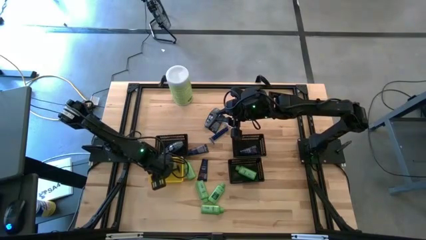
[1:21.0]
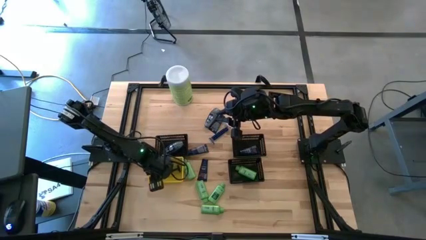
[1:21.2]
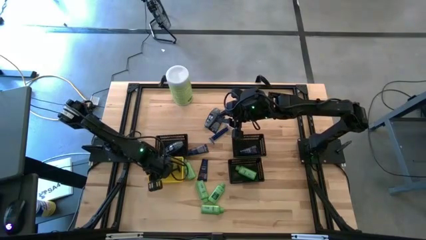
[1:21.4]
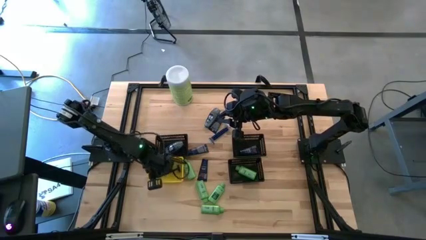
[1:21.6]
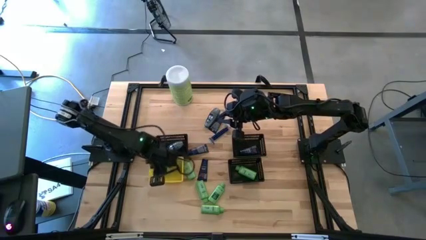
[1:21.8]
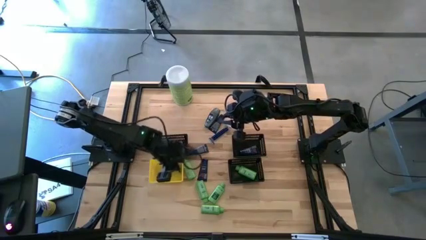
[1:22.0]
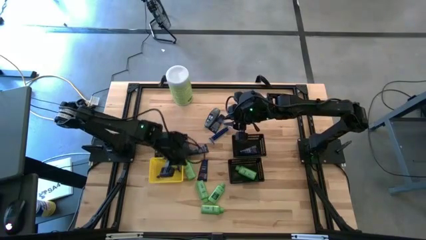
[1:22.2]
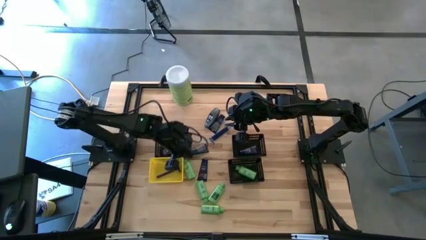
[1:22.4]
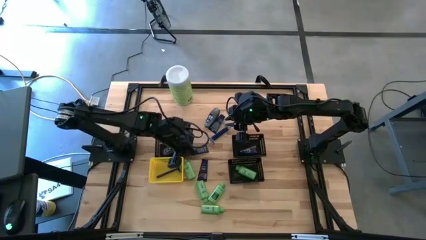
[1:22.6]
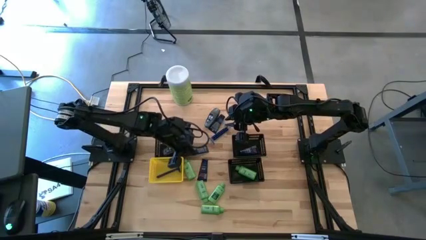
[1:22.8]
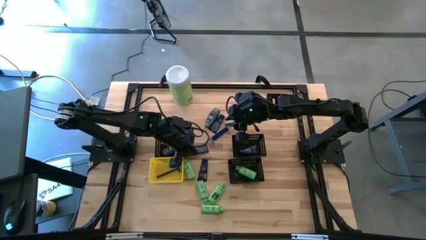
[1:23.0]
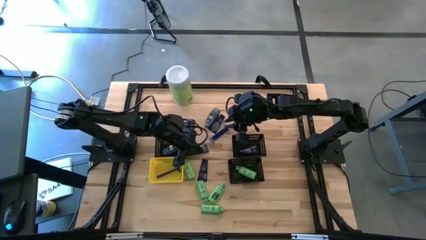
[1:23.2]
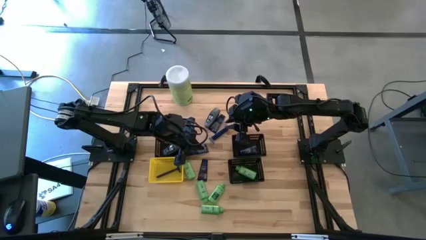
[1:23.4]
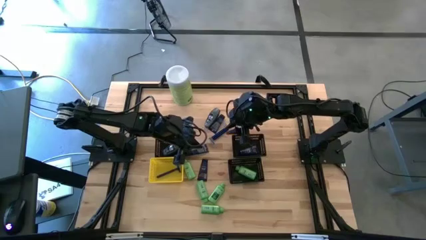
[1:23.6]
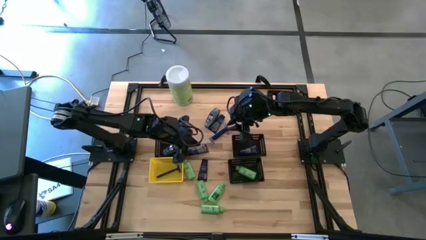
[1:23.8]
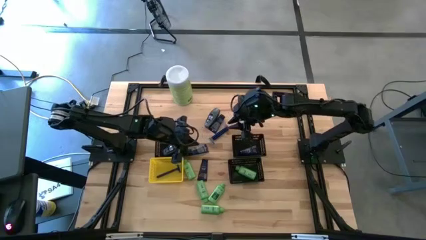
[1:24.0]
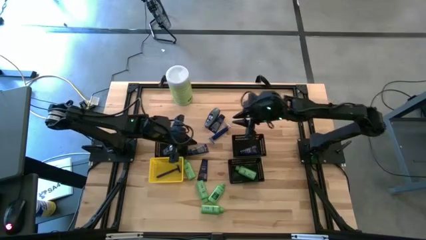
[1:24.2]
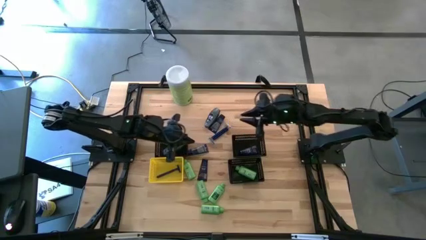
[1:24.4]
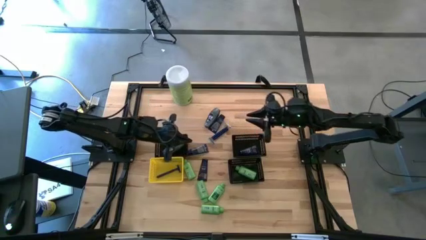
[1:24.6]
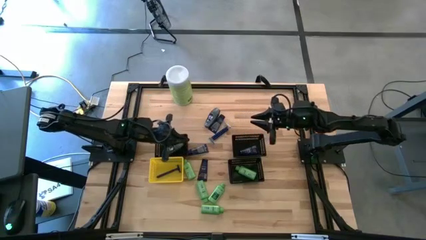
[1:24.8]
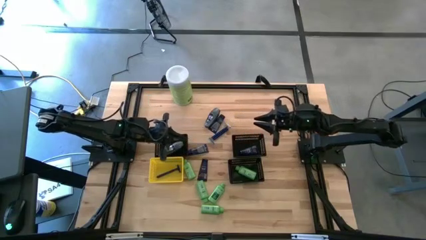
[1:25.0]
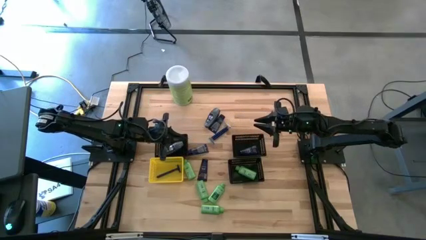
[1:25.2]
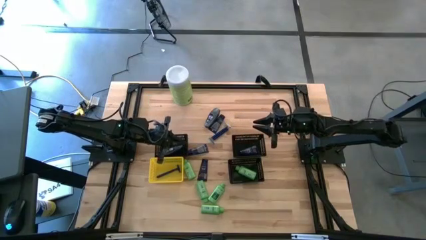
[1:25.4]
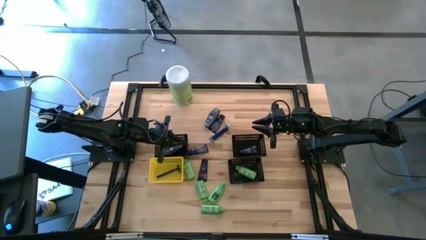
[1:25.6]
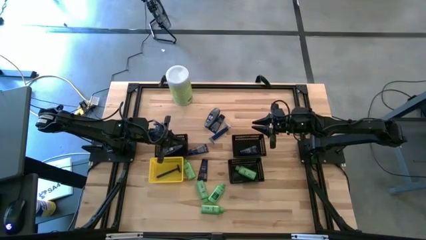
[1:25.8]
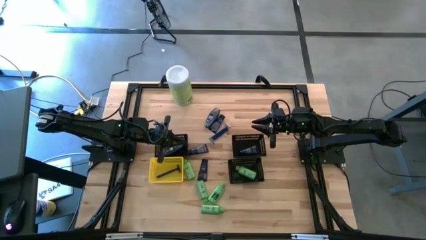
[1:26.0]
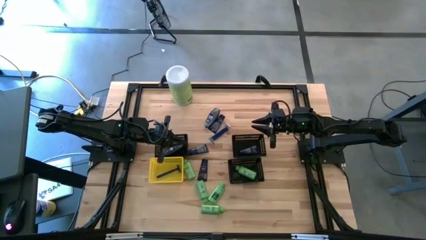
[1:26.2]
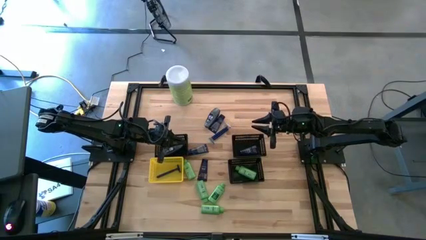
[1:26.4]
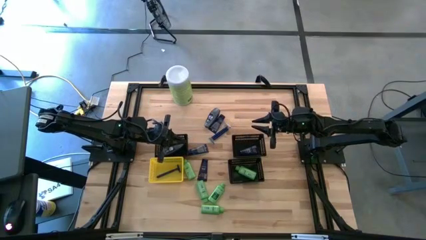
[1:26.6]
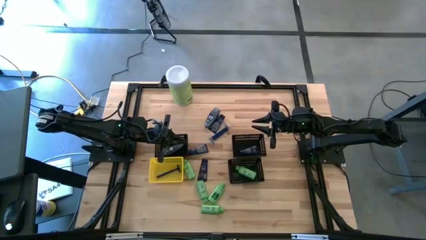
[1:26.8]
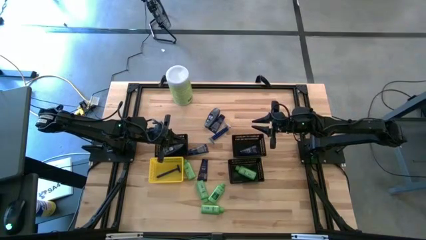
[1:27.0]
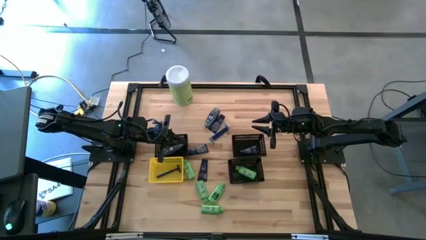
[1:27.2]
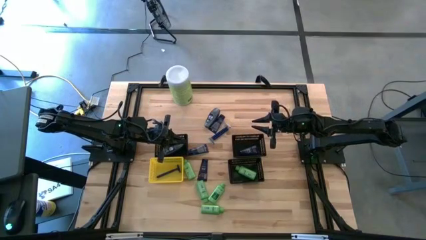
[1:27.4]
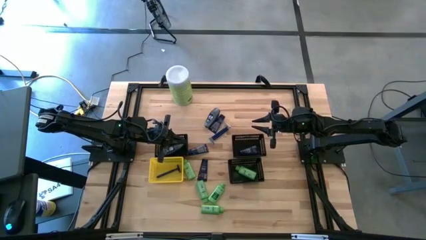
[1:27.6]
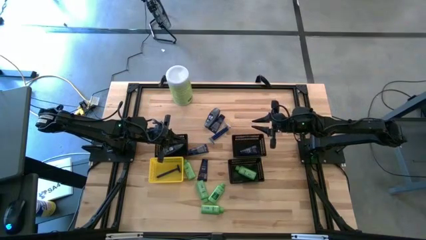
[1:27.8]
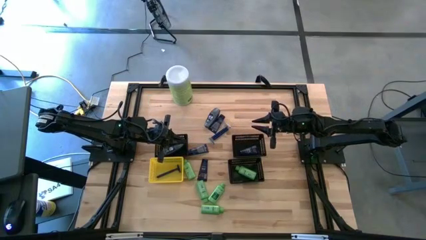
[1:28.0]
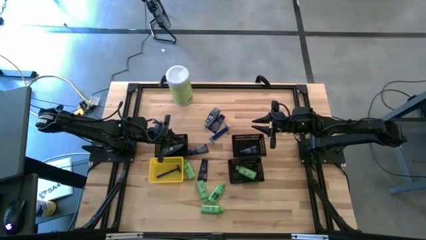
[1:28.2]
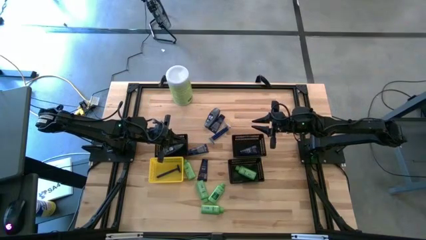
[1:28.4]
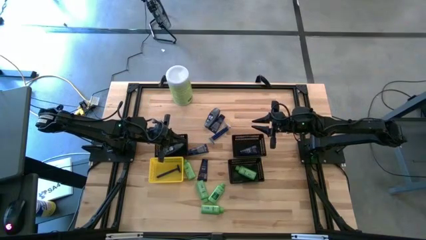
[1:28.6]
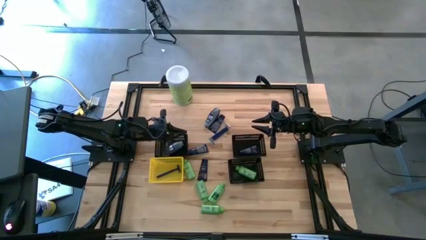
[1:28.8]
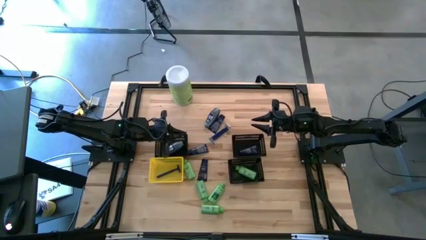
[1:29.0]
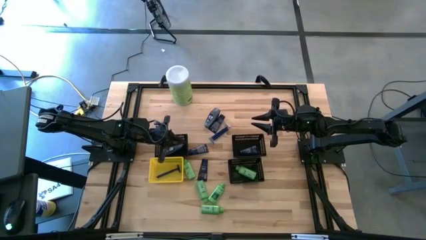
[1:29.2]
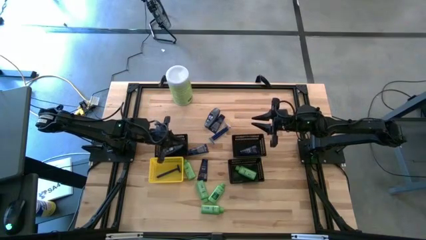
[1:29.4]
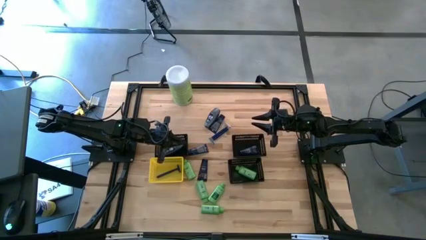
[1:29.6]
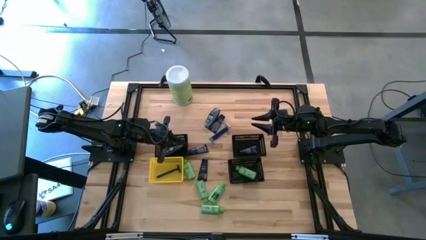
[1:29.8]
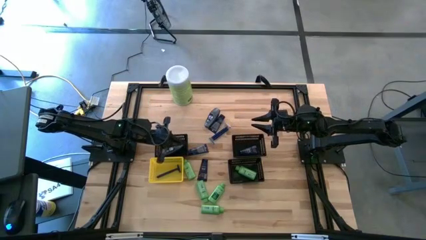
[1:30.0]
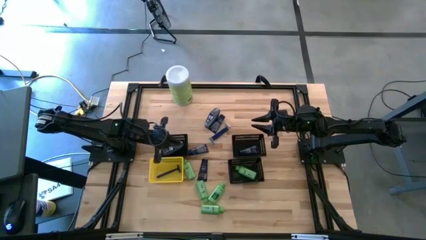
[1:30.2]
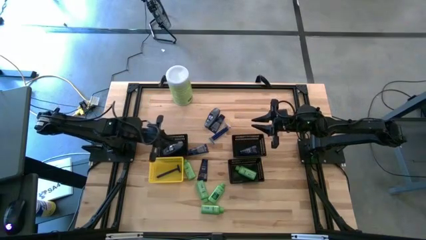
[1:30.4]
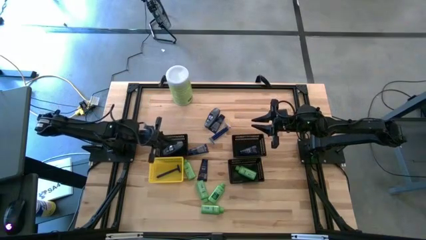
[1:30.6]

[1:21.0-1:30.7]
Task: Pick & Place Travel size toiletries
Put the blue shave cream into the top right black bin

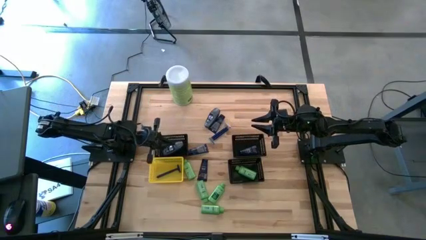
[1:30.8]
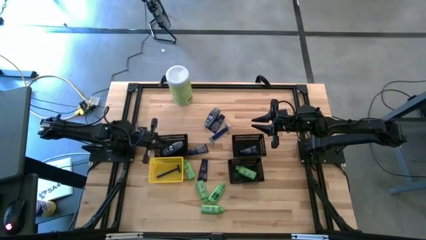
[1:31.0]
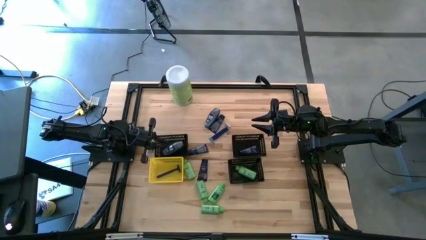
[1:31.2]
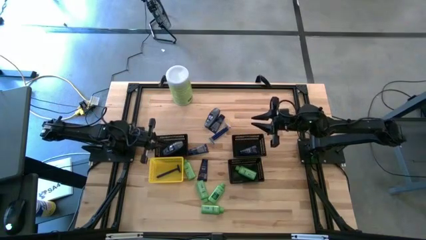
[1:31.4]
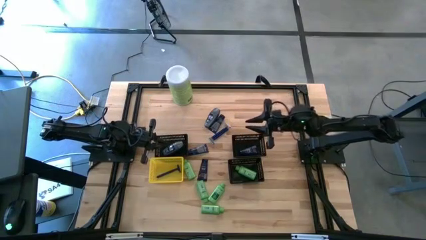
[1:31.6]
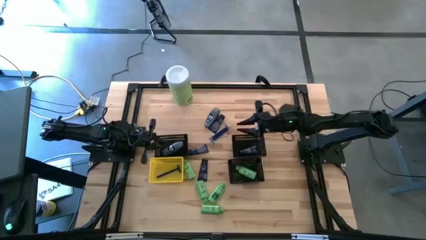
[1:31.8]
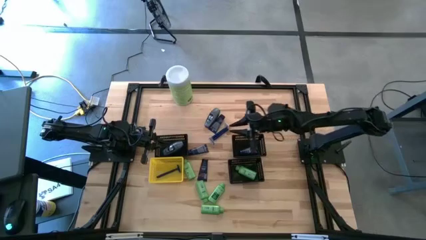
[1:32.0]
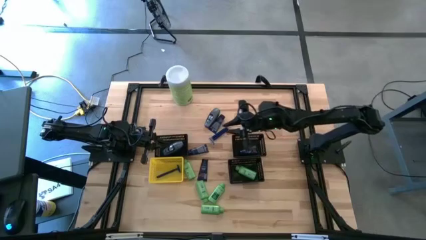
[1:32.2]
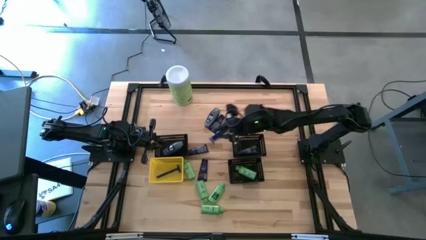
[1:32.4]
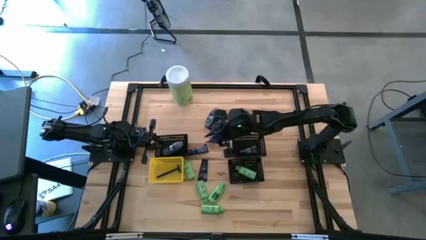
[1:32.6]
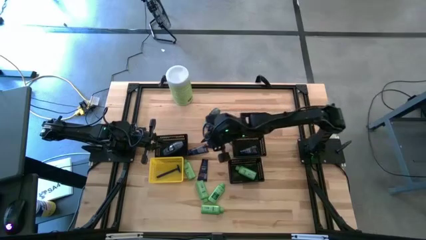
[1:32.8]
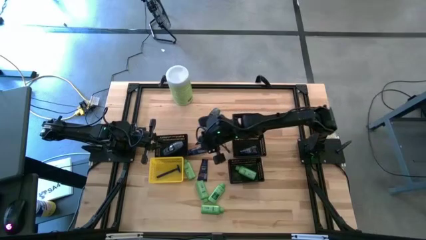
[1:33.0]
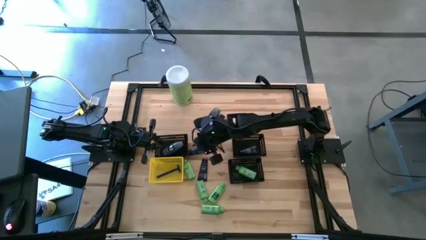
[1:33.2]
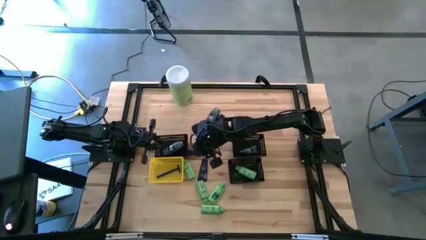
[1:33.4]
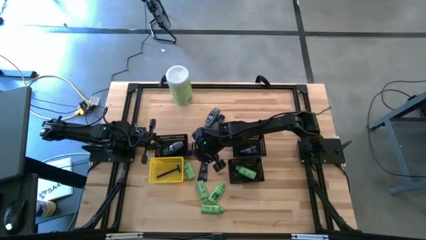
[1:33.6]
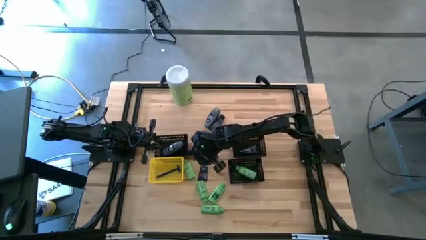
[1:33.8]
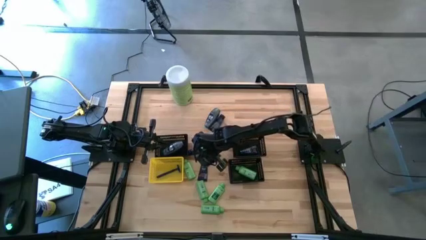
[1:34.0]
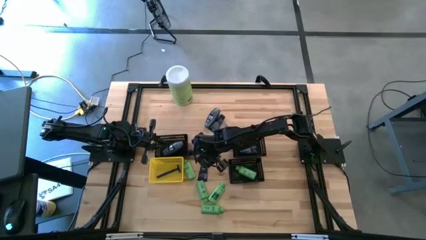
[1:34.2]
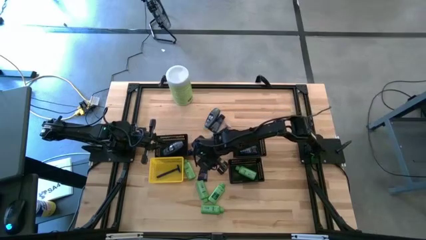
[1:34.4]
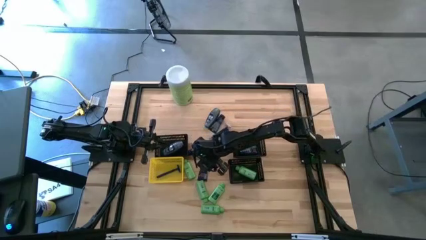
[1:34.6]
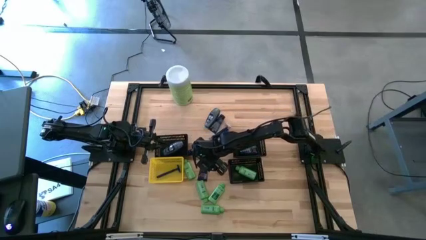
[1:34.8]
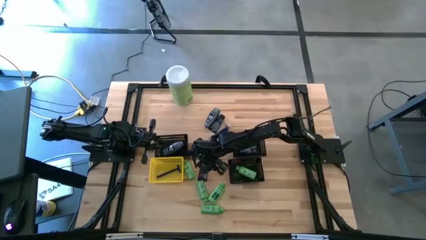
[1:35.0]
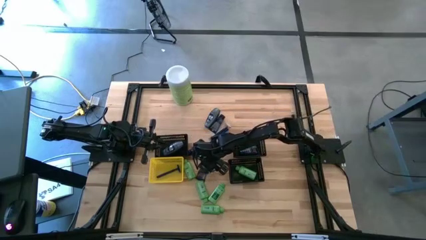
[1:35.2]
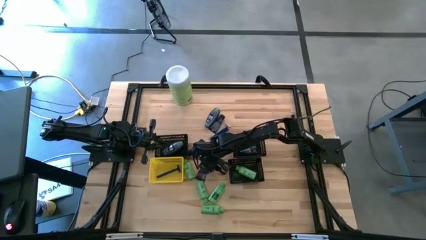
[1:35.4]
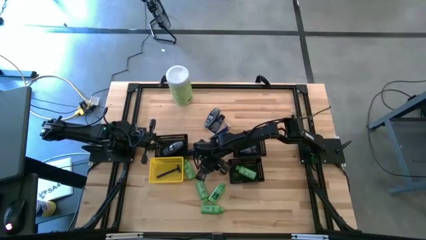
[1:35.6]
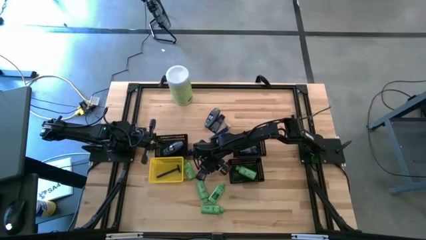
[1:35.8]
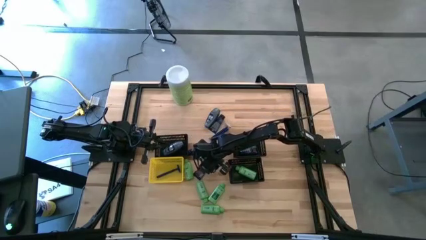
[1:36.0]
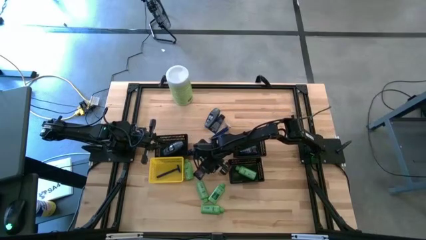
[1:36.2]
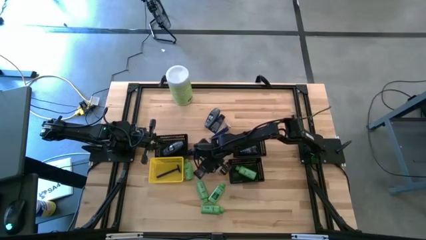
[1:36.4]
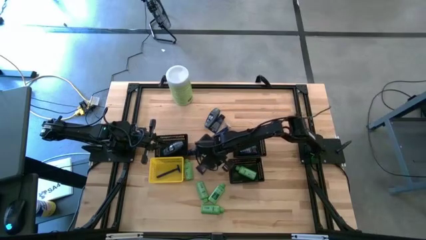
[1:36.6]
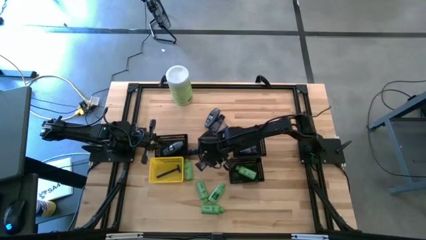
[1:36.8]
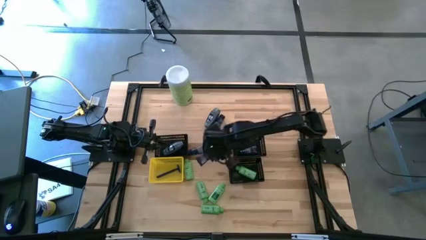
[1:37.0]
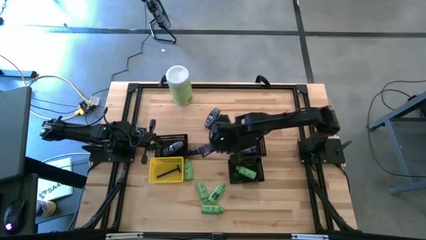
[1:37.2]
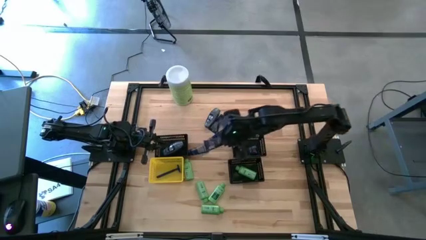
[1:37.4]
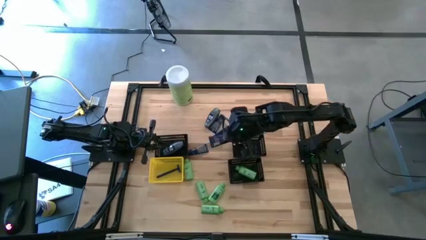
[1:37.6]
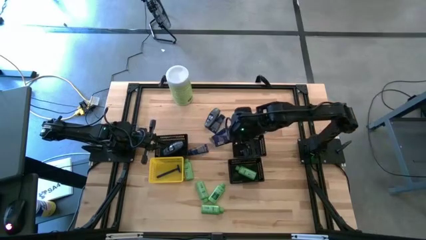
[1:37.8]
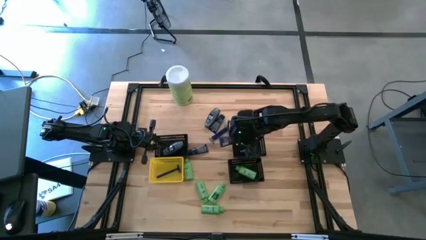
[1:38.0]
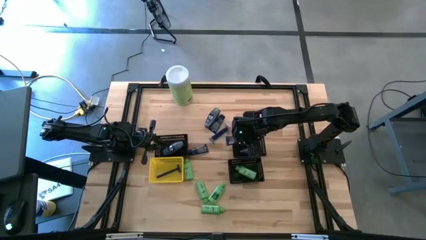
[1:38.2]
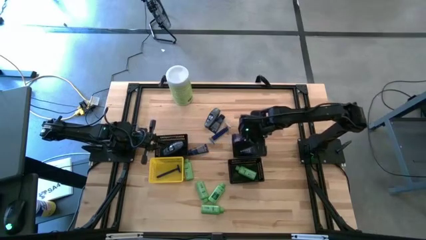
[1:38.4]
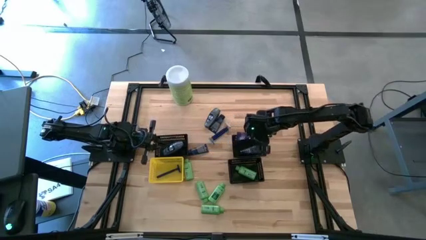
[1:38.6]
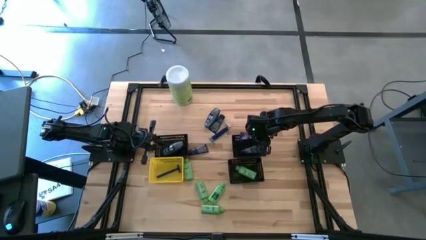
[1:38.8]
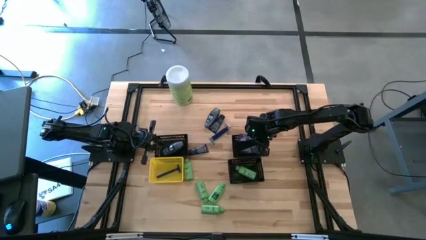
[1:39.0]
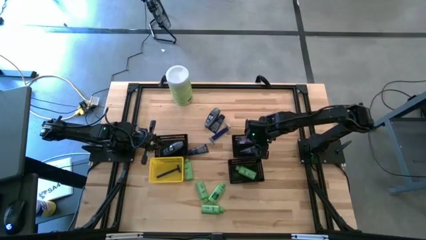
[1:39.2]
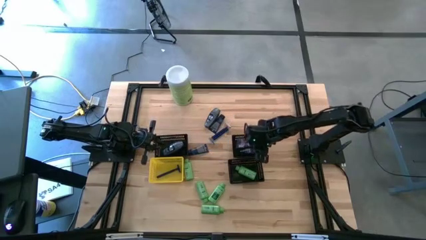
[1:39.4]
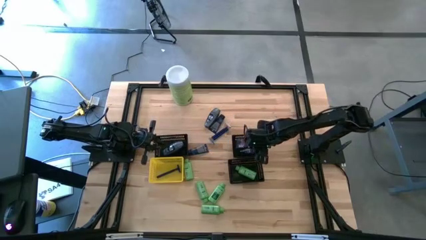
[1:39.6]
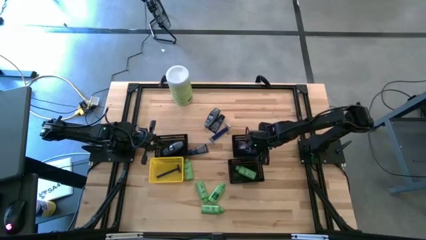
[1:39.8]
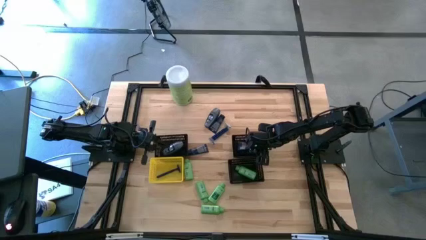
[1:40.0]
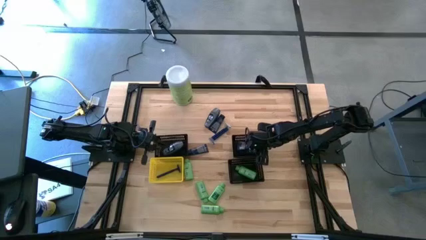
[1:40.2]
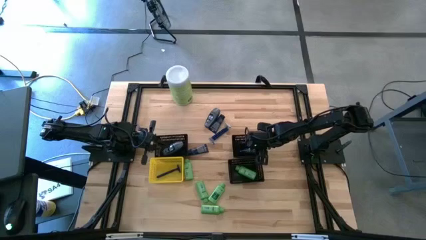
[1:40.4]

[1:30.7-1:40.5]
Put the blue shave cream into the top right black bin
